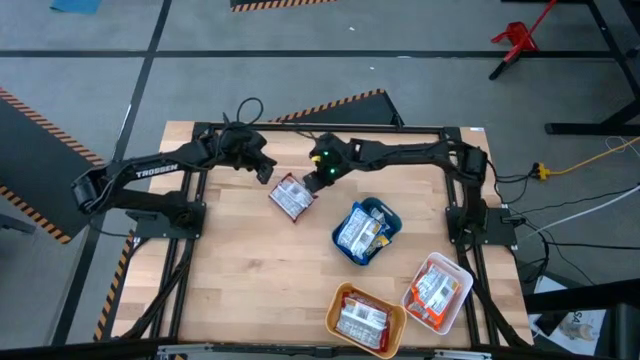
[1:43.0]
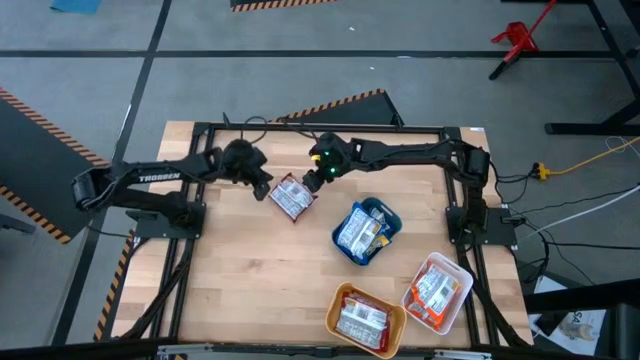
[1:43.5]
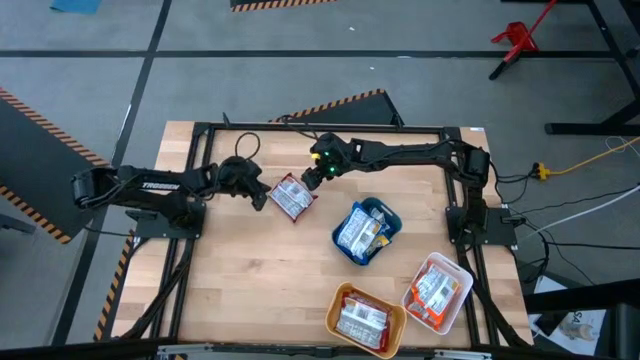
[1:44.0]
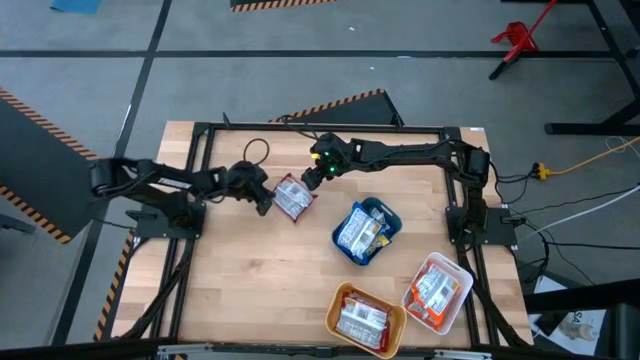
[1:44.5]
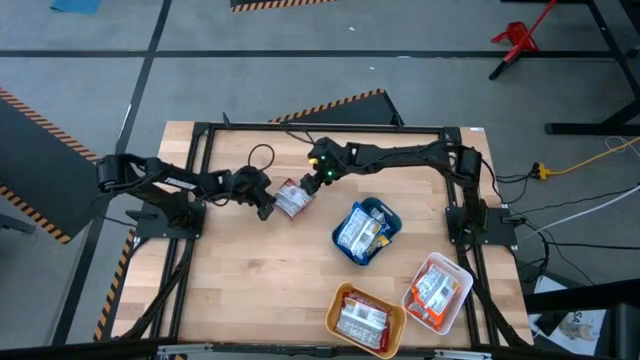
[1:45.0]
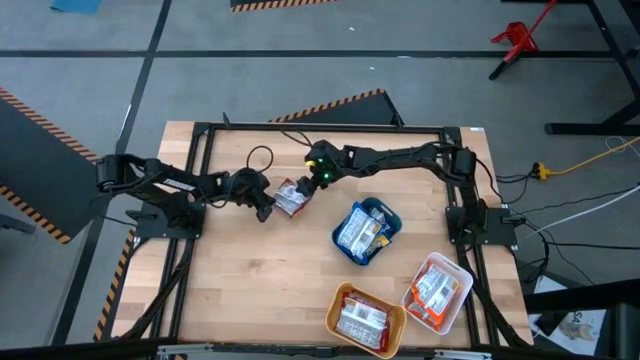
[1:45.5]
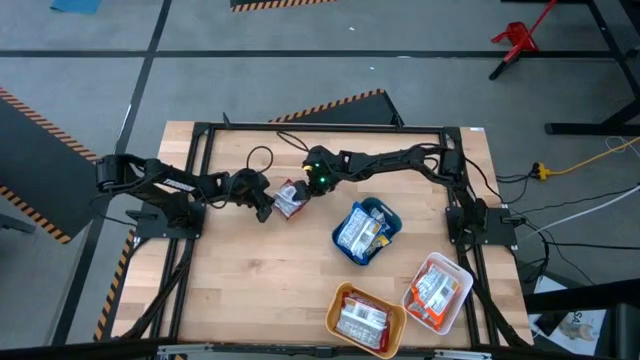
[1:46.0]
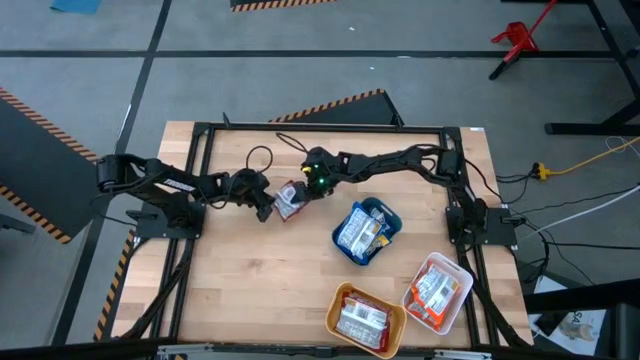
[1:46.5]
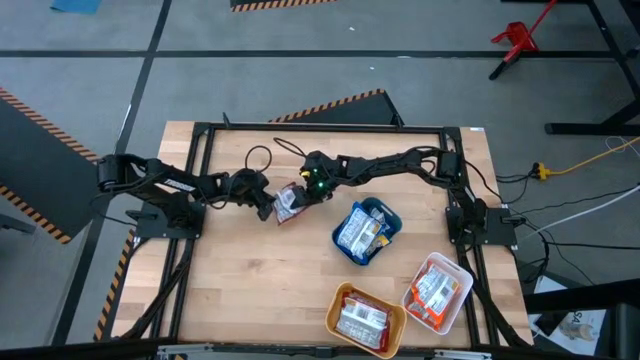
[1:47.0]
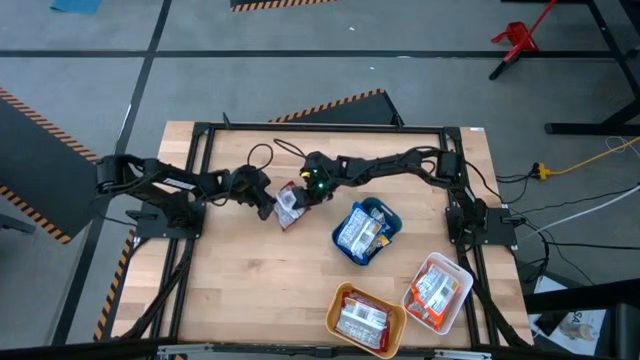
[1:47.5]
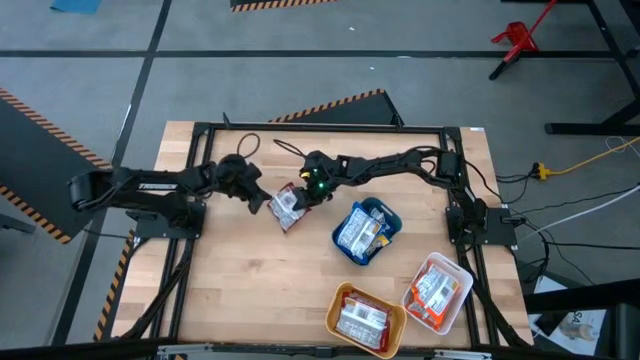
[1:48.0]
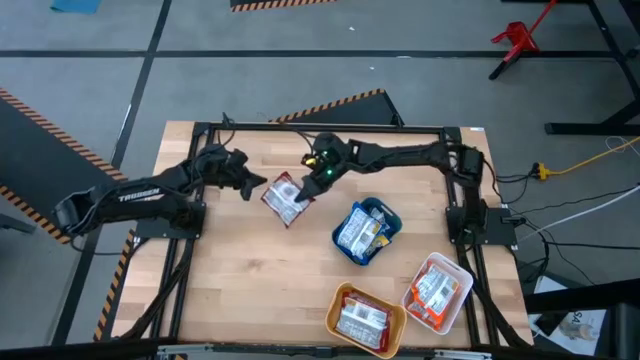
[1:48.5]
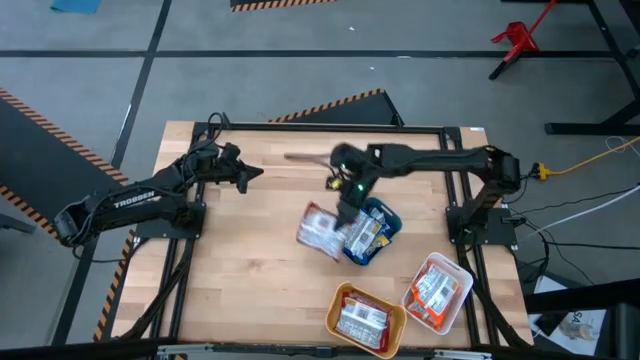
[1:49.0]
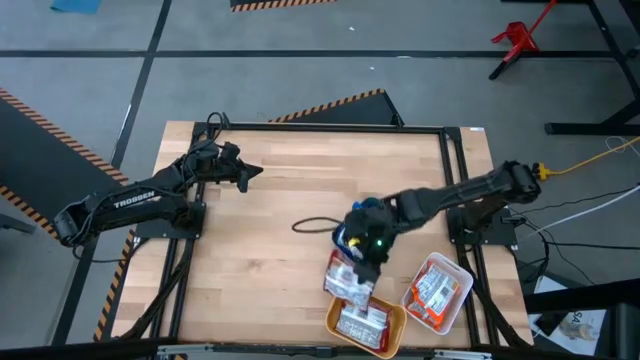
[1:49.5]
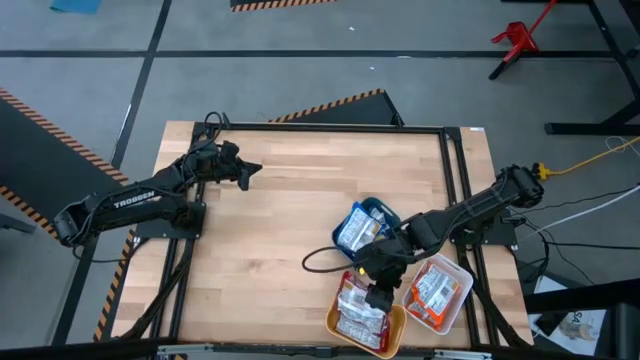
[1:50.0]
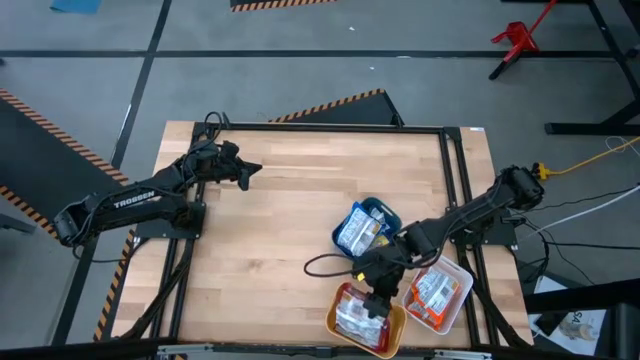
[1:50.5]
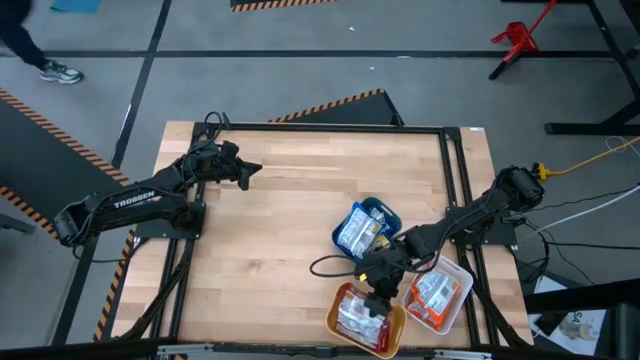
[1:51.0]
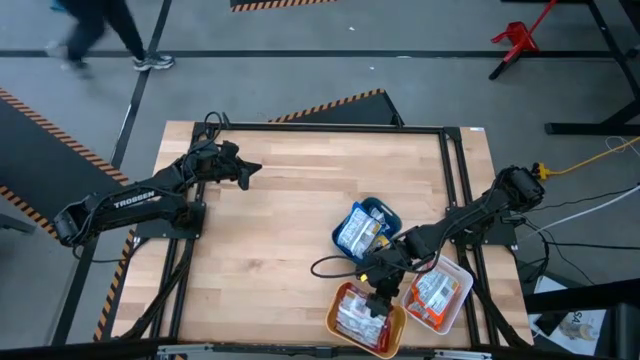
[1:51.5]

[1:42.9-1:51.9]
Task: Sort Maruchan noodles
Put the red noodle pack into the yellow bin

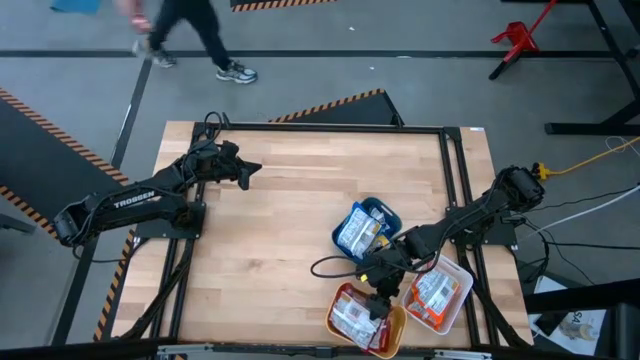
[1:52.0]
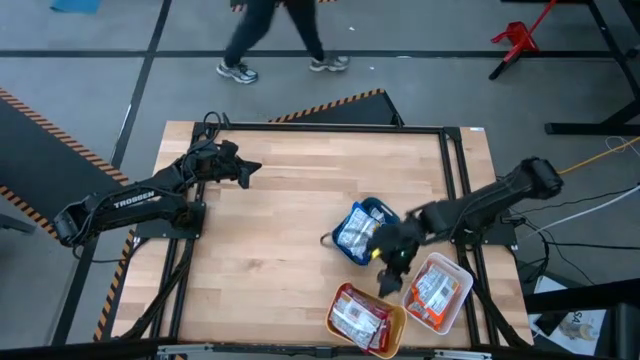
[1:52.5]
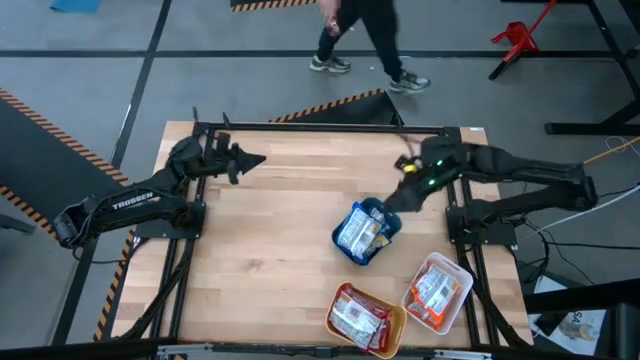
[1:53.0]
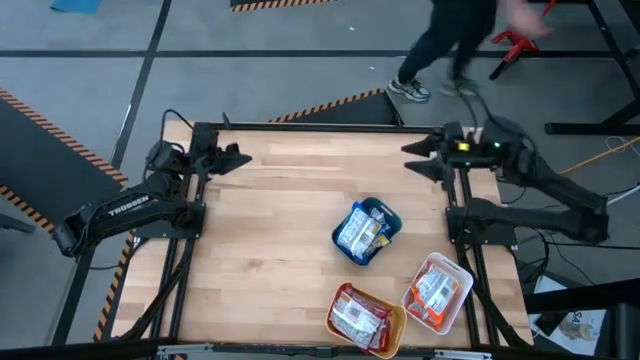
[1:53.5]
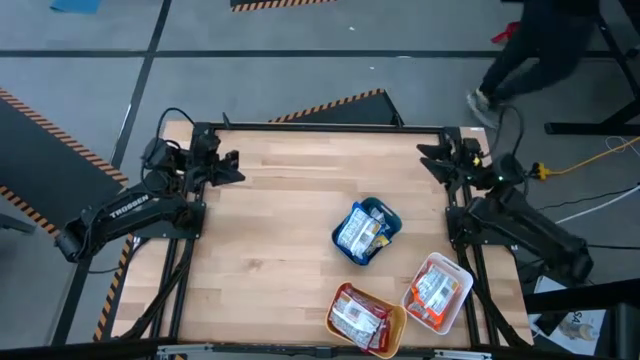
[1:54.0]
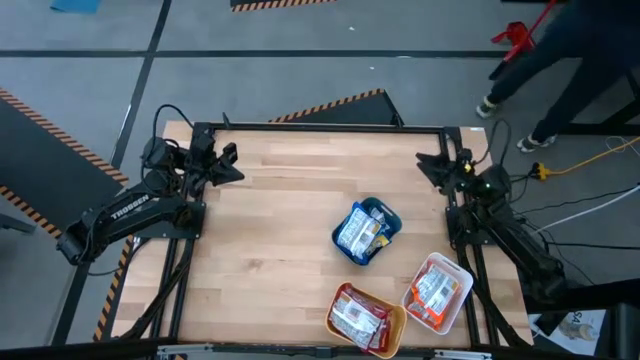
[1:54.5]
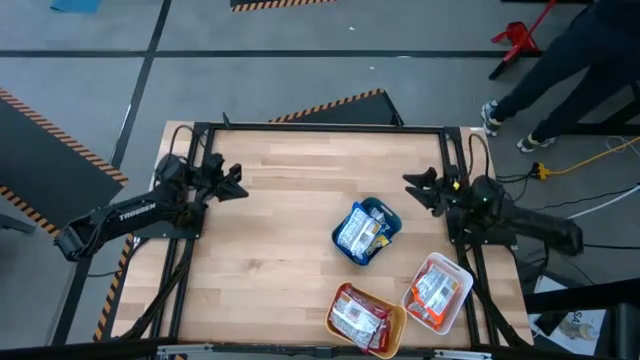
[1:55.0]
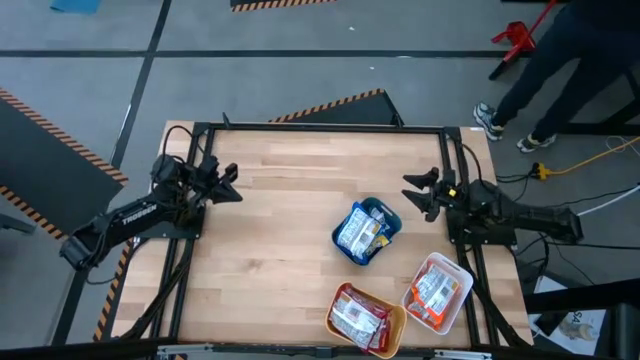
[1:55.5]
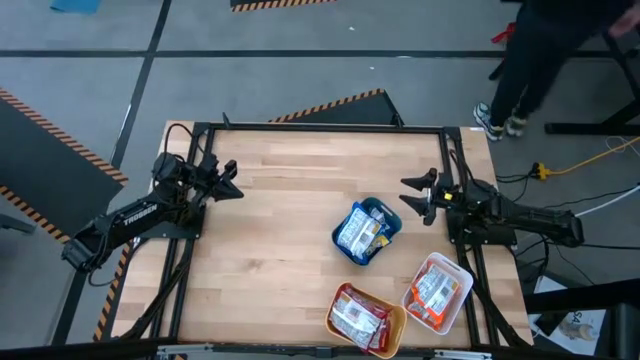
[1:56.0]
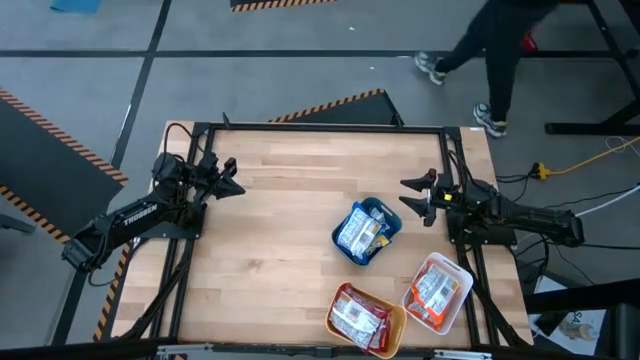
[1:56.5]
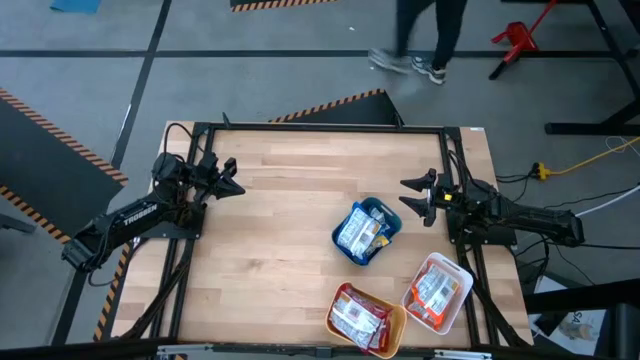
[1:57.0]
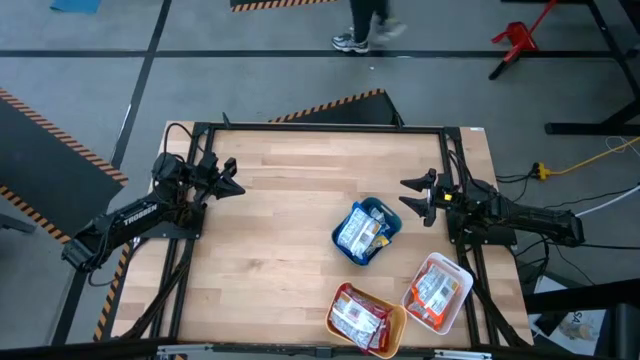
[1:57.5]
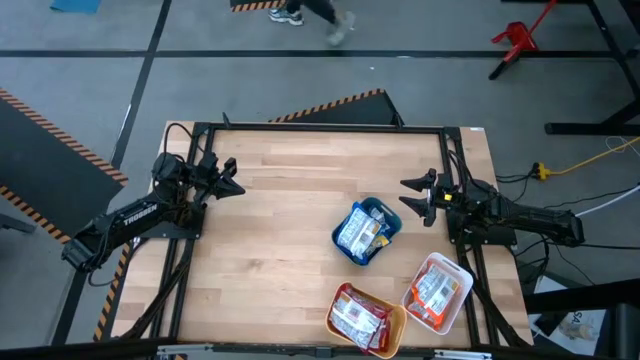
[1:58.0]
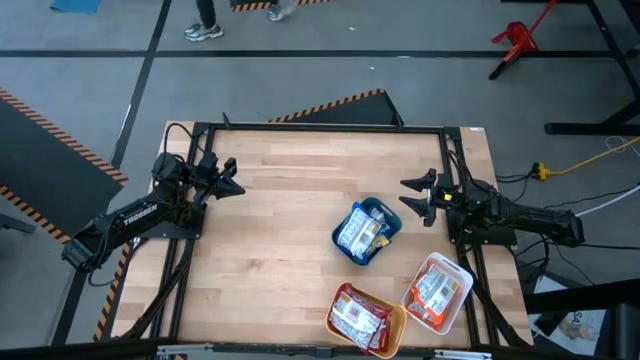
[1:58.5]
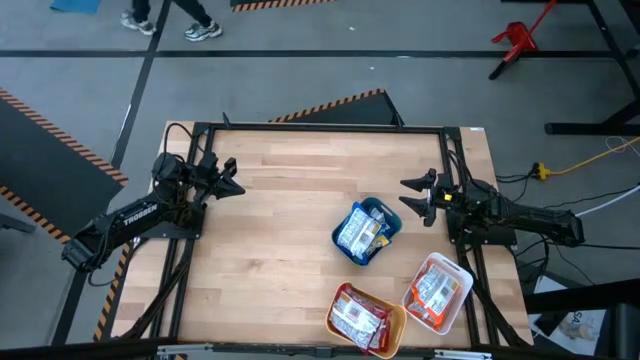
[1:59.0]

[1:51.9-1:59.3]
Return to Home Position

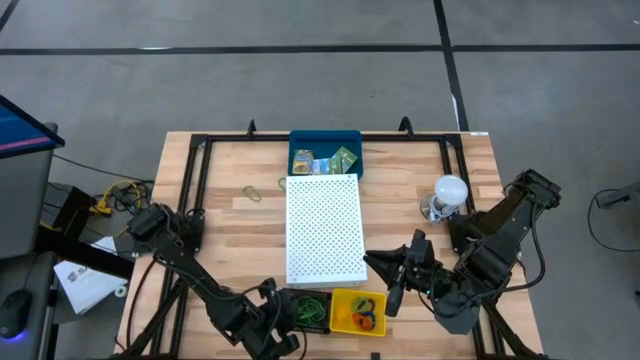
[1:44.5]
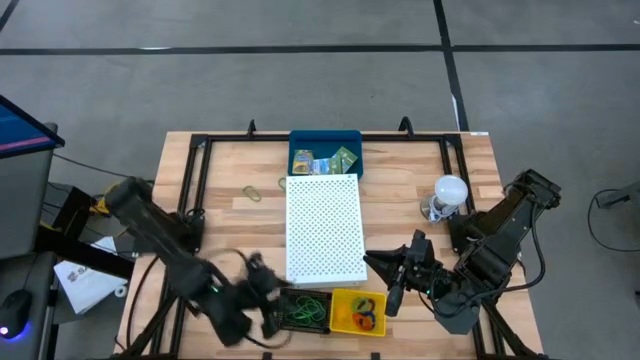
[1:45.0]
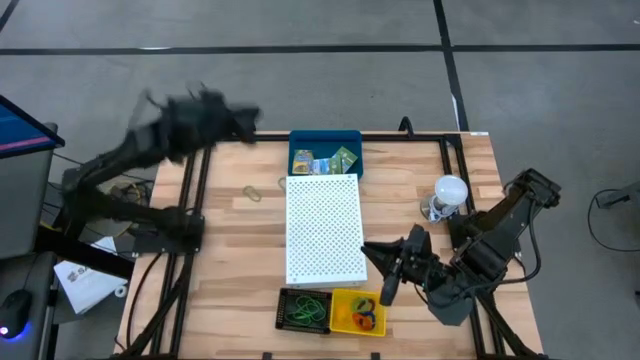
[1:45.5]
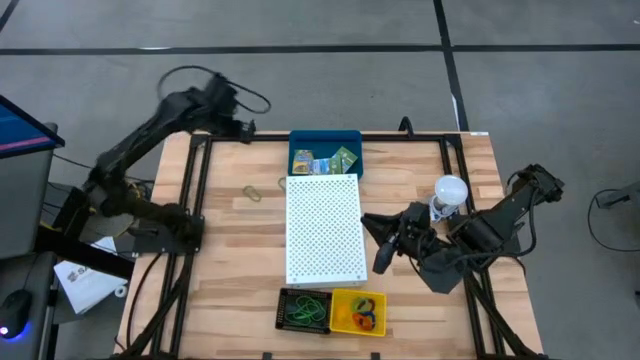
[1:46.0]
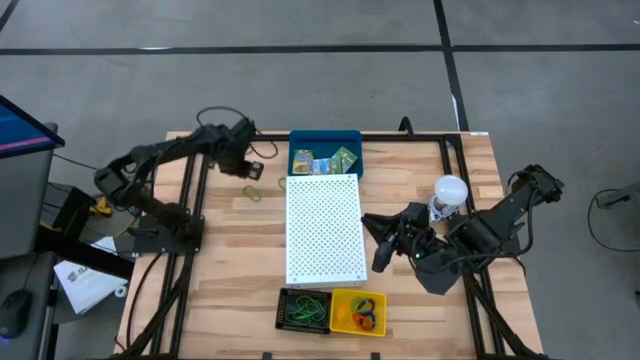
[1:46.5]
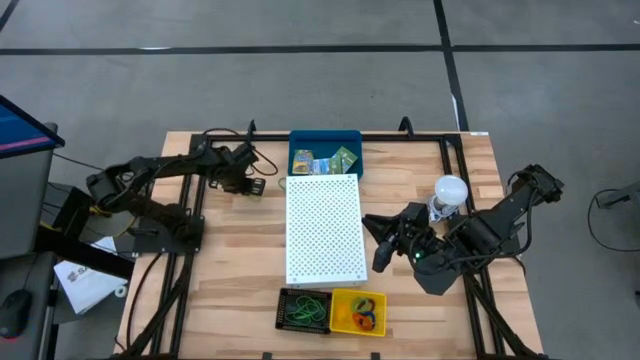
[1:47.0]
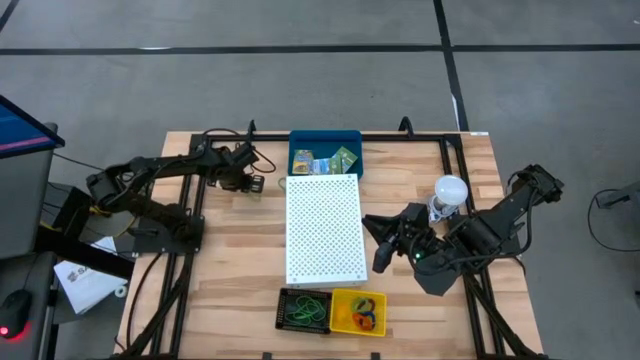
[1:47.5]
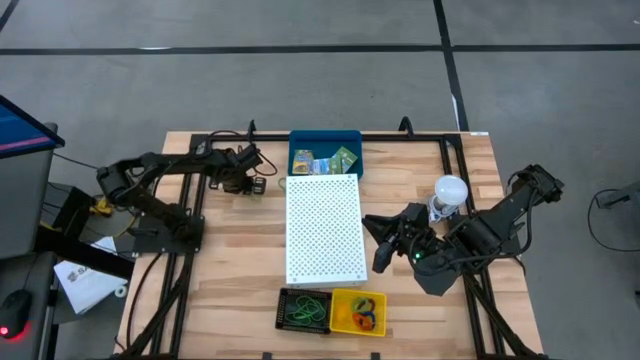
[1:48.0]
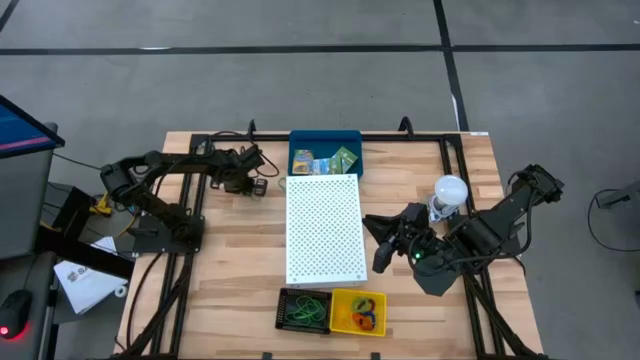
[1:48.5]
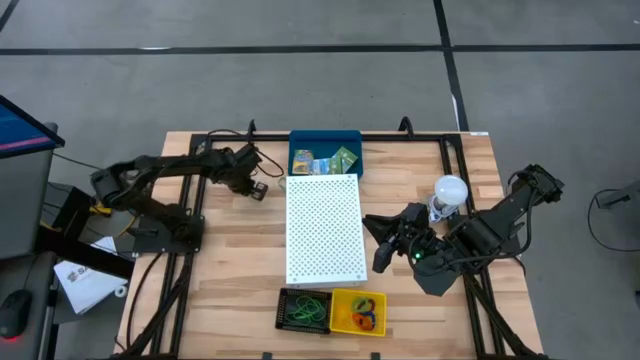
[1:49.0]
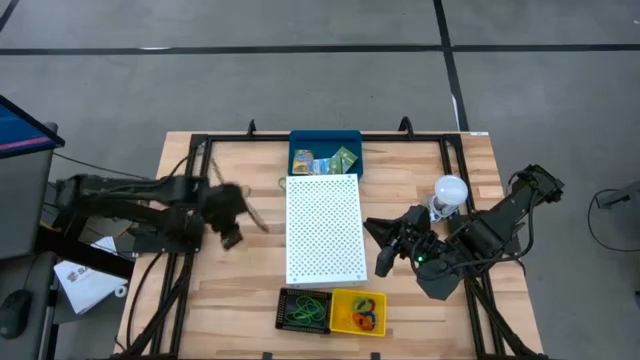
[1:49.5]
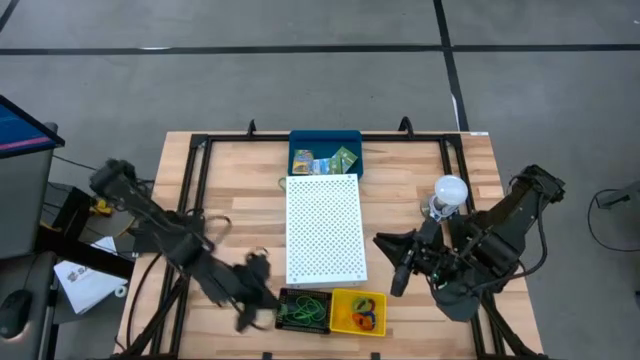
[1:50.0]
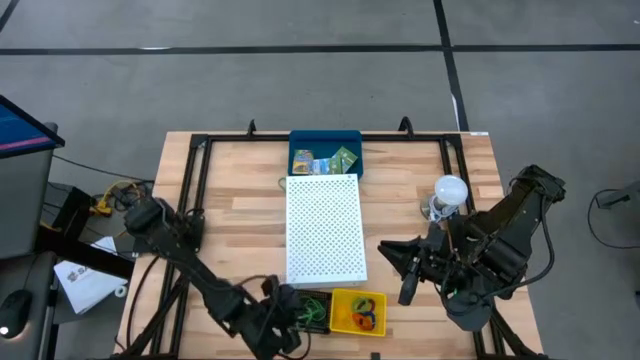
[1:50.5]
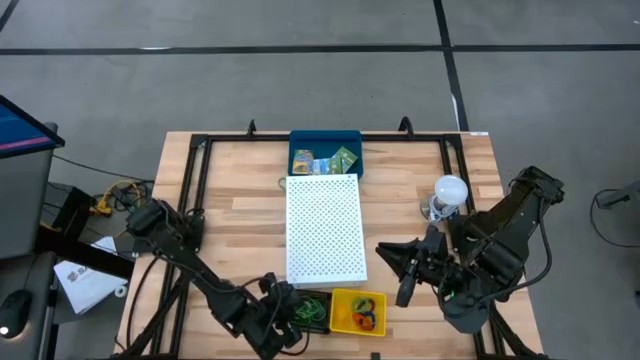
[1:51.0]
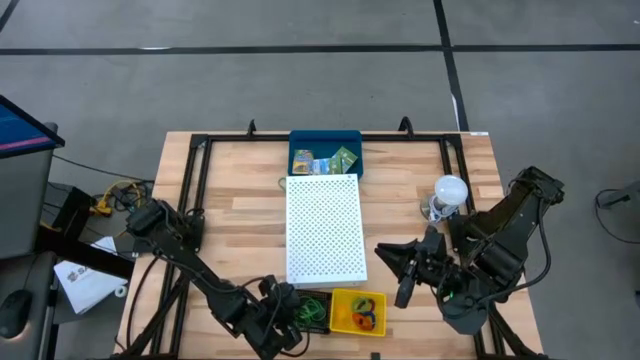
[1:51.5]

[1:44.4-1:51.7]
Task: Pick & Place Office Desk Supplies
Put the green rubber band into the black bin
